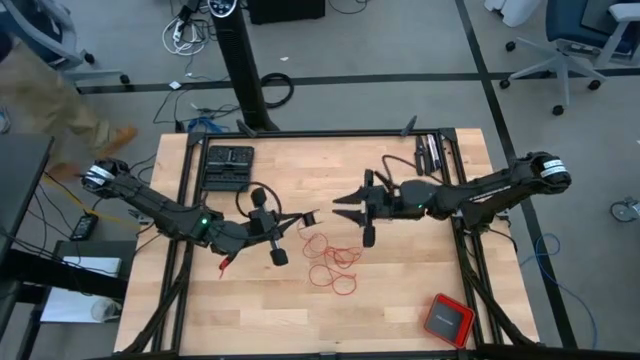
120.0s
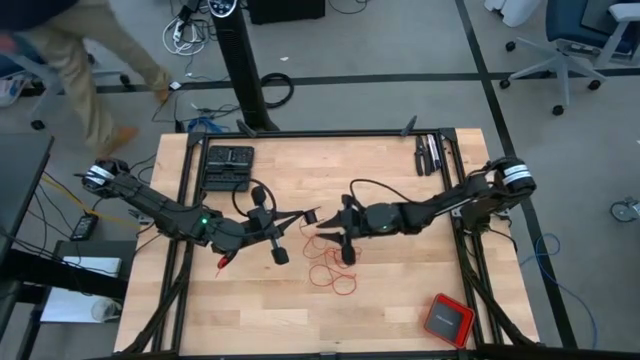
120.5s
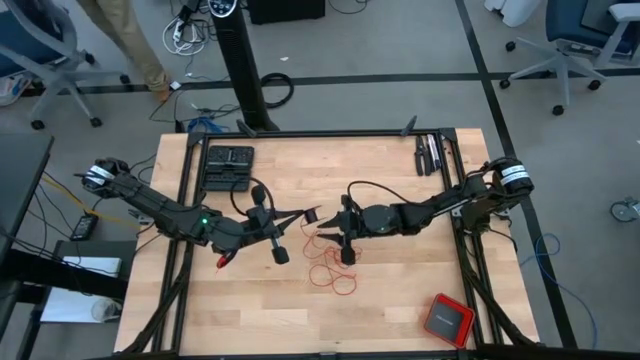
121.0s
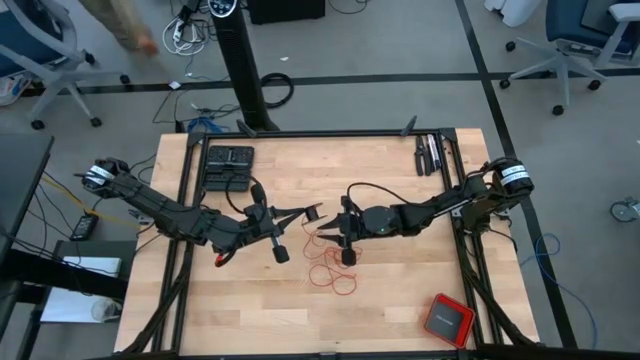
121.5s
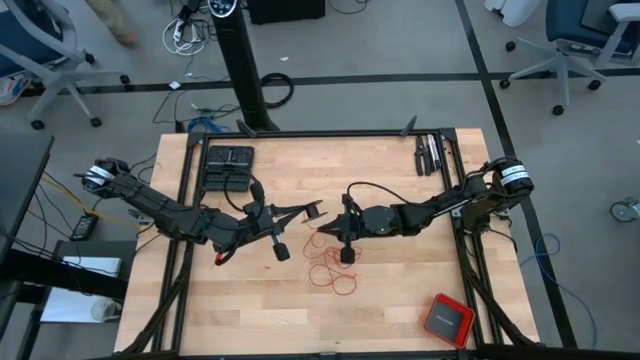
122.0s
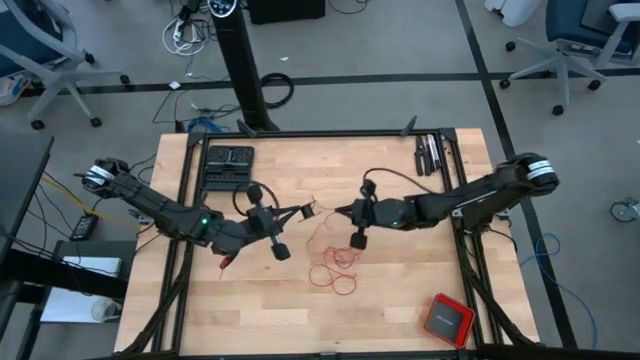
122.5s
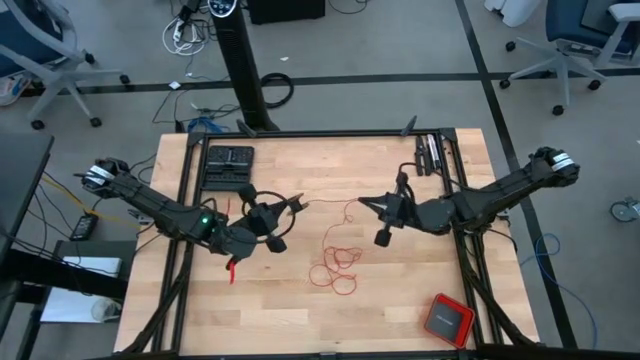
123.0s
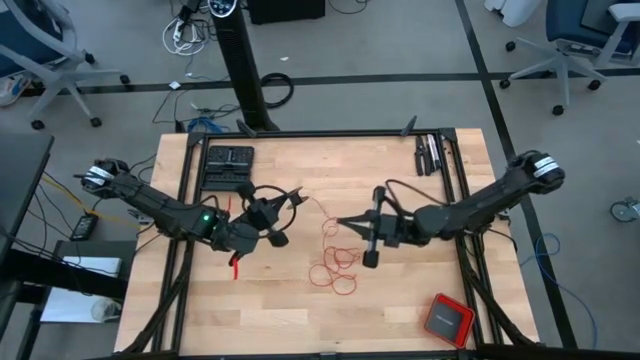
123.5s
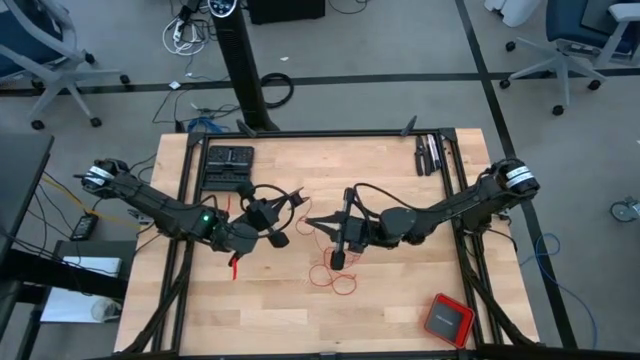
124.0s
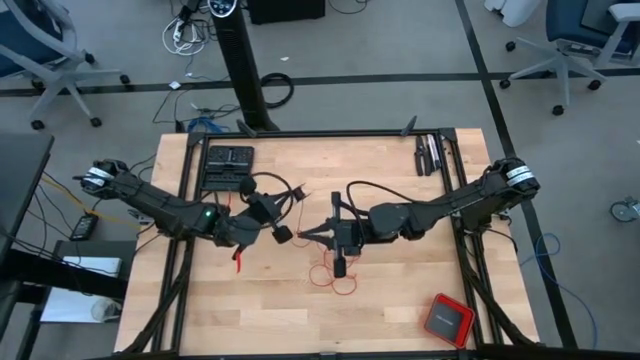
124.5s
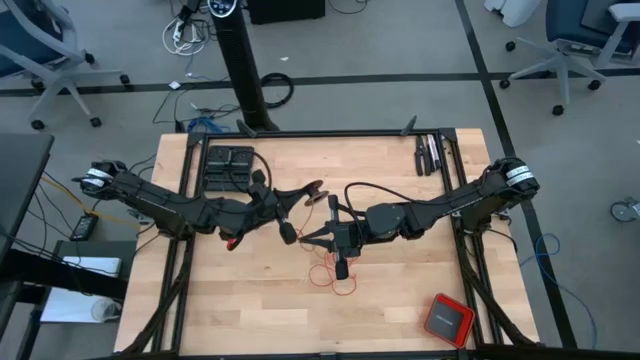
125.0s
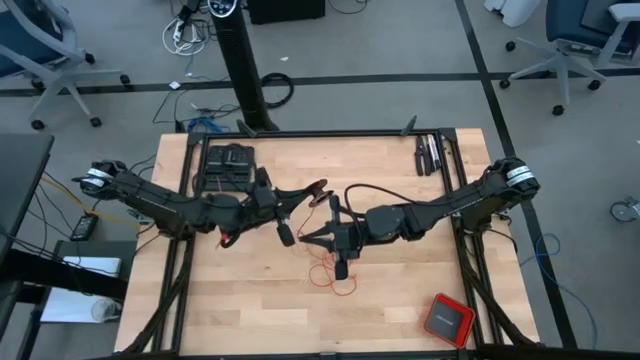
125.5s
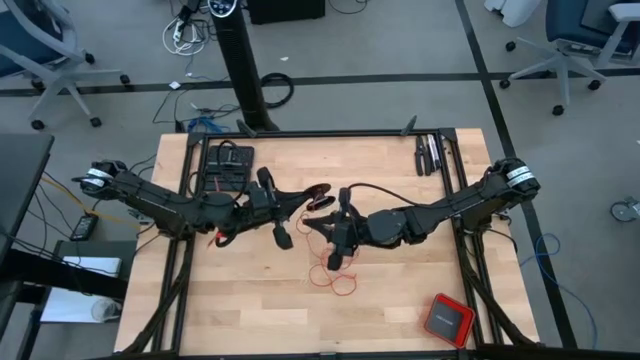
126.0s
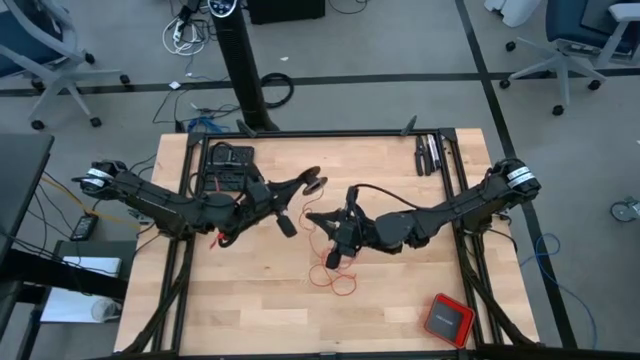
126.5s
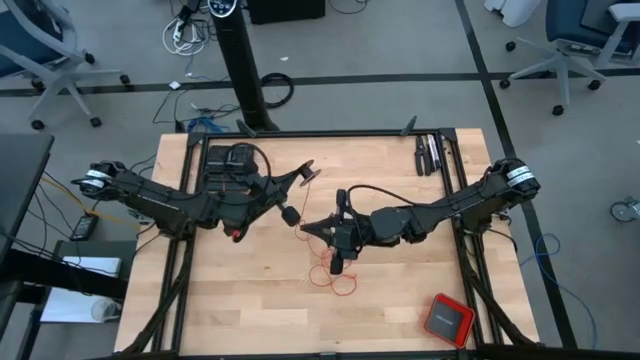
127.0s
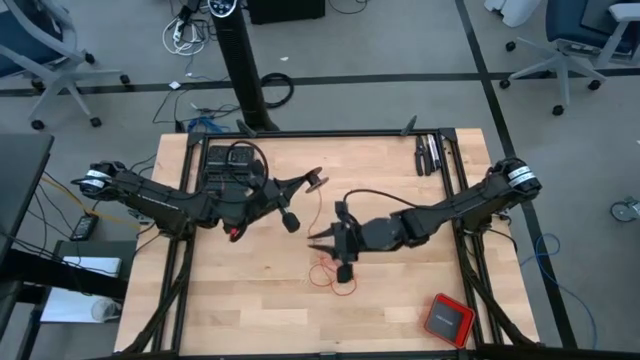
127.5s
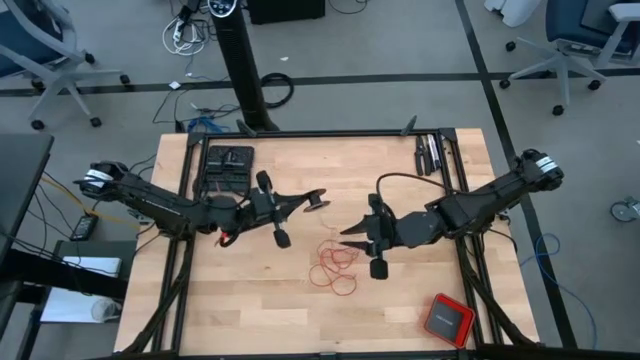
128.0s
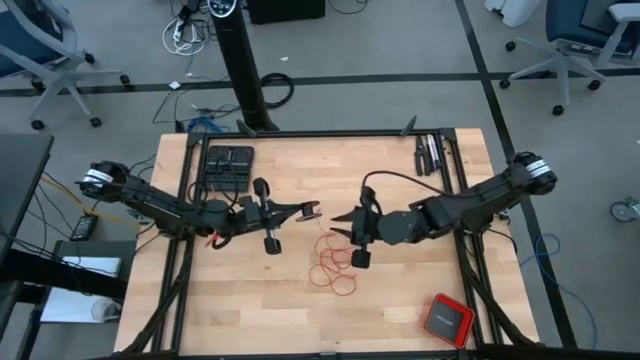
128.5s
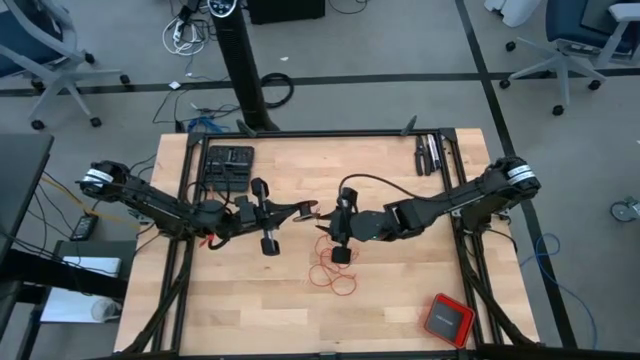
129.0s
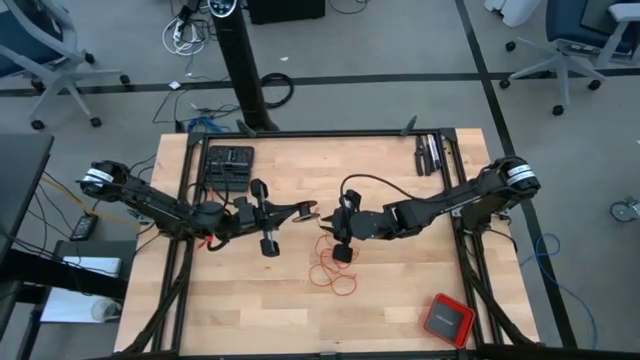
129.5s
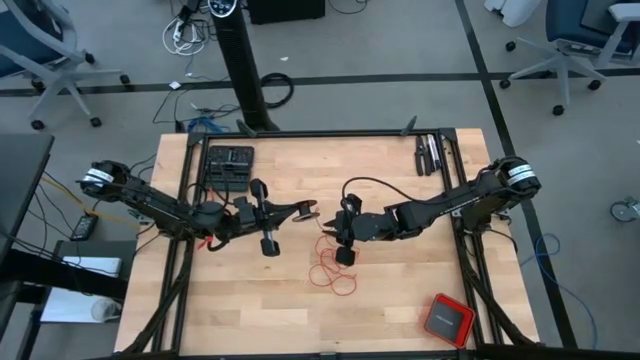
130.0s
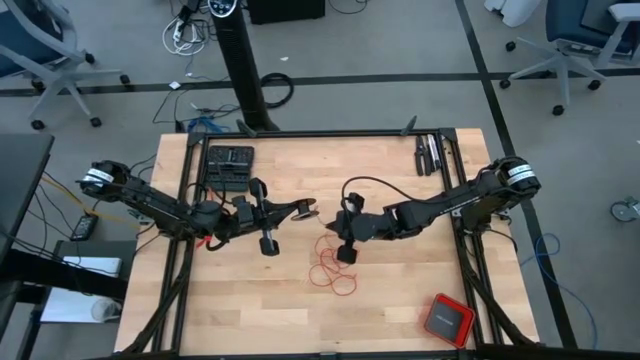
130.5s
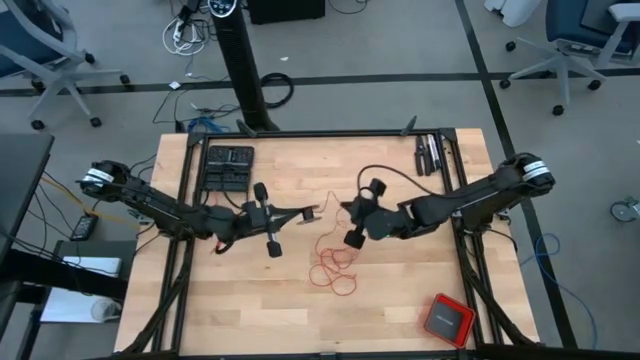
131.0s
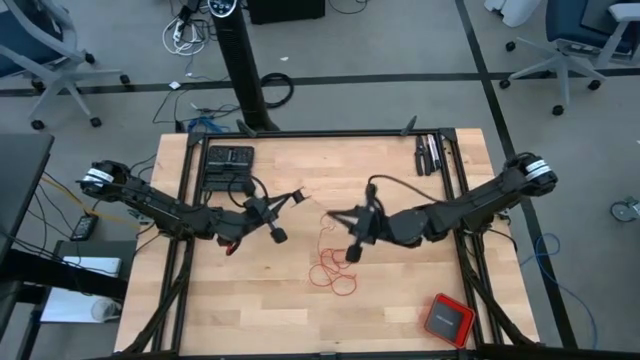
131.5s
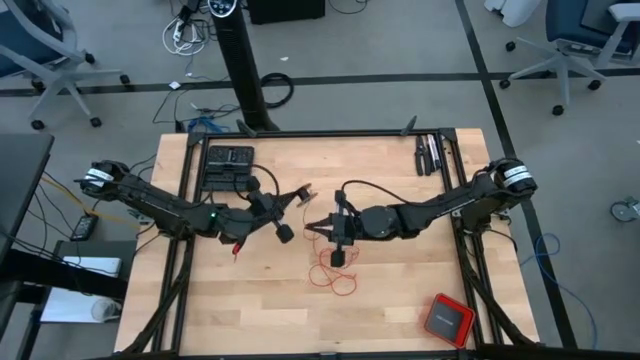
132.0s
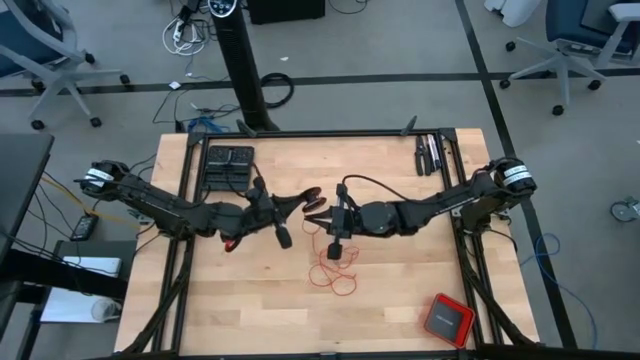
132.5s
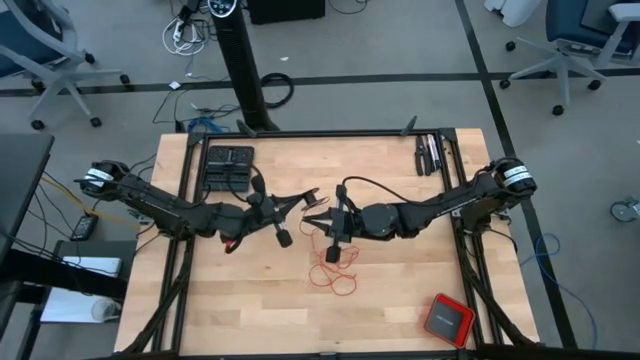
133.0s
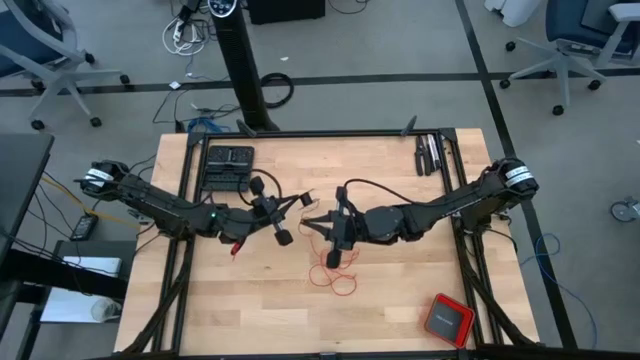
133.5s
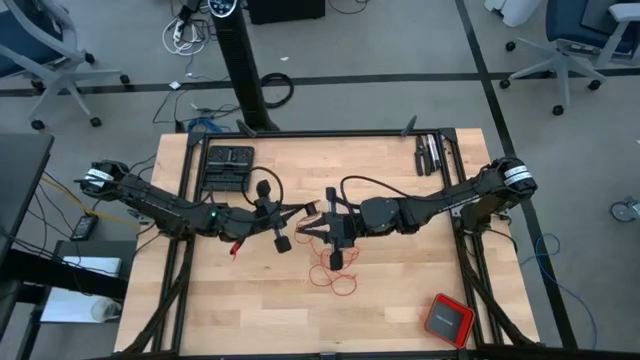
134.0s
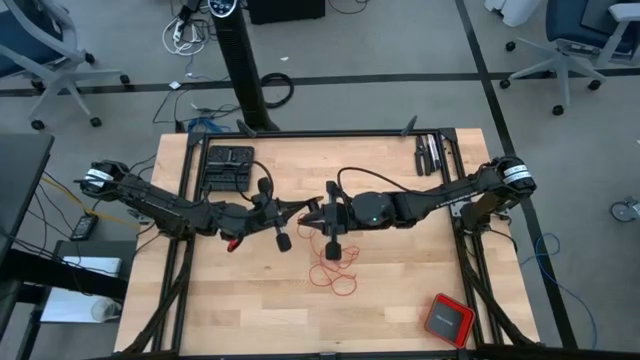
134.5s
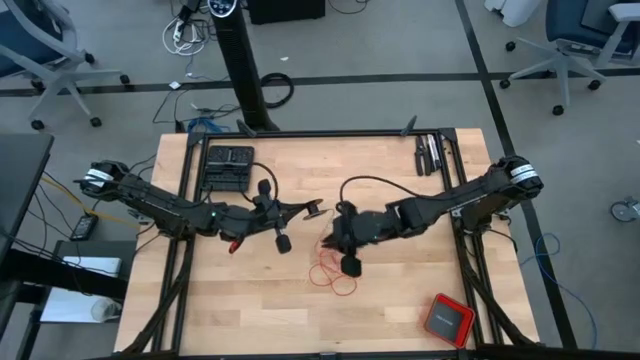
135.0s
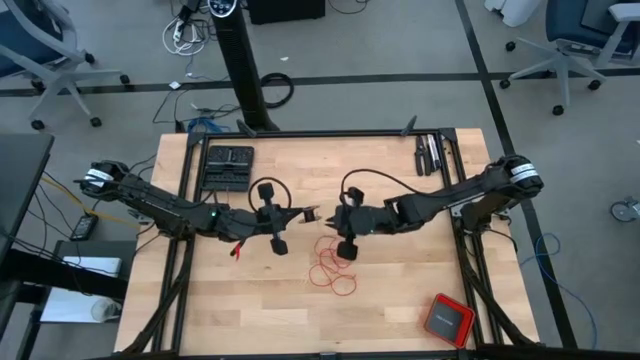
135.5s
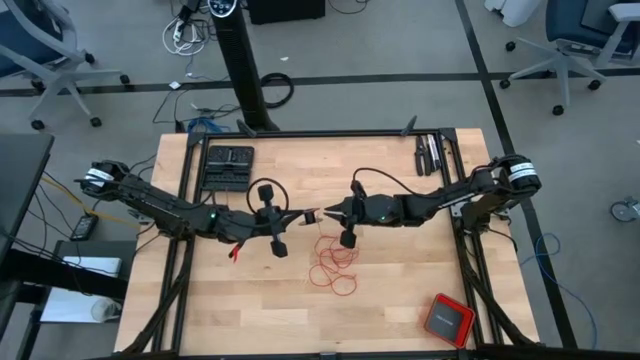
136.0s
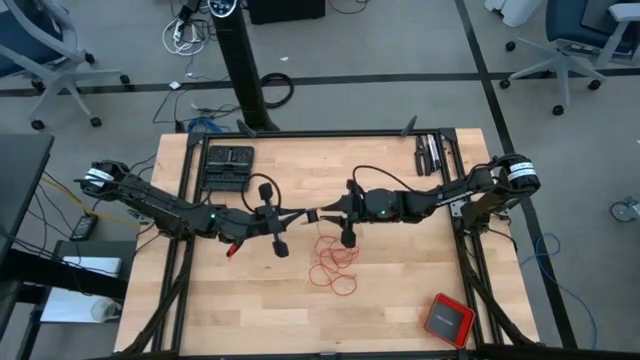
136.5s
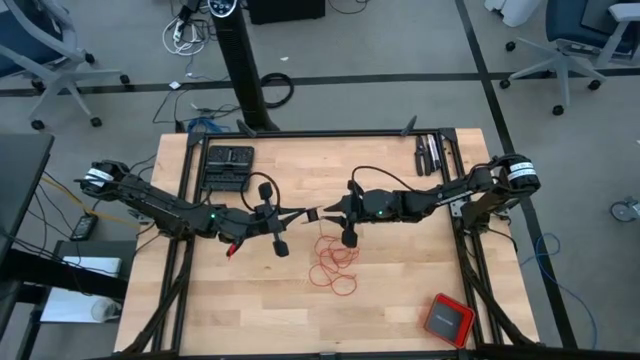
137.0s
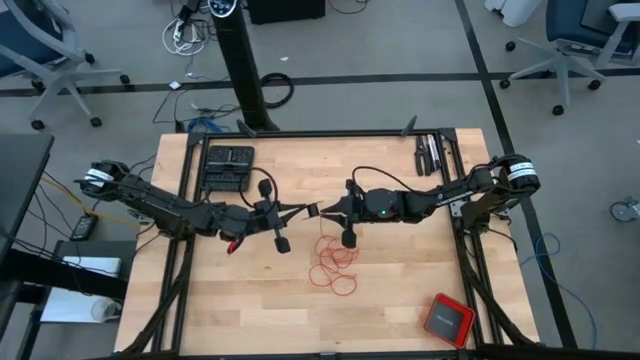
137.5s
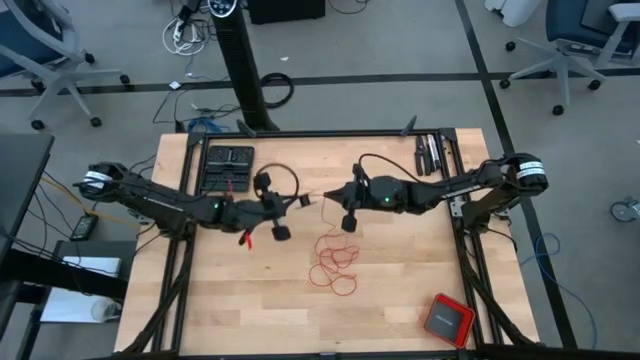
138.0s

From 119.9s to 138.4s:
Task: Coil cords
Coil the red wire onto the spool
